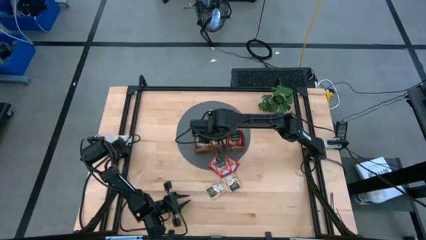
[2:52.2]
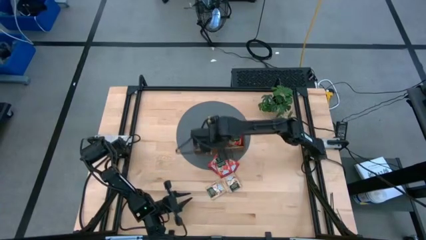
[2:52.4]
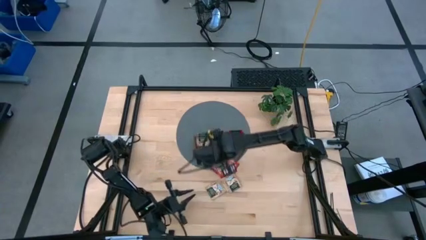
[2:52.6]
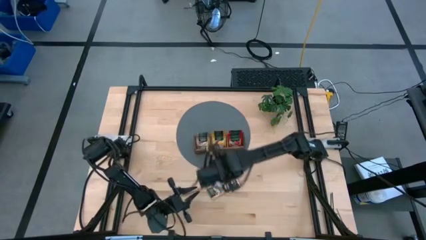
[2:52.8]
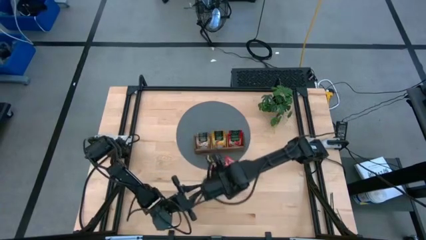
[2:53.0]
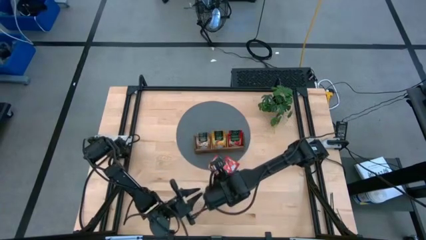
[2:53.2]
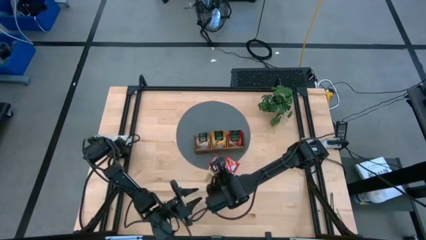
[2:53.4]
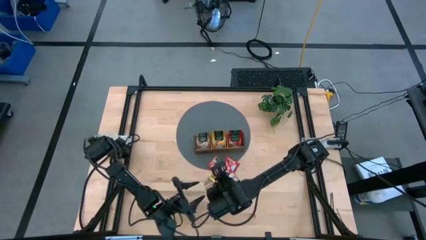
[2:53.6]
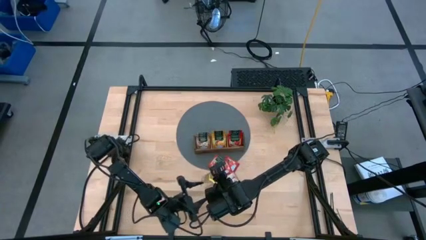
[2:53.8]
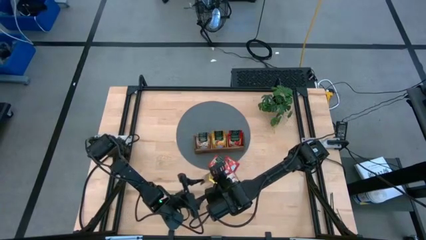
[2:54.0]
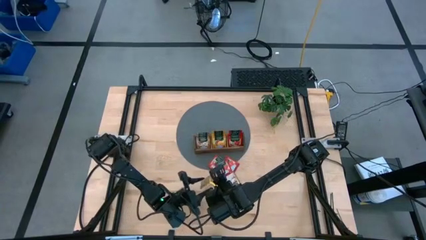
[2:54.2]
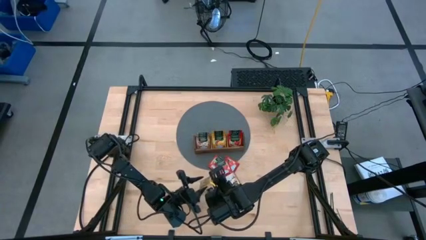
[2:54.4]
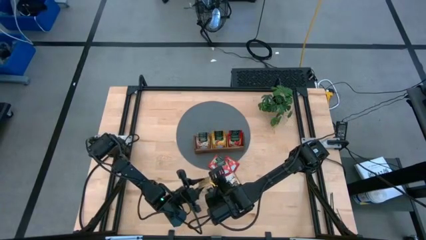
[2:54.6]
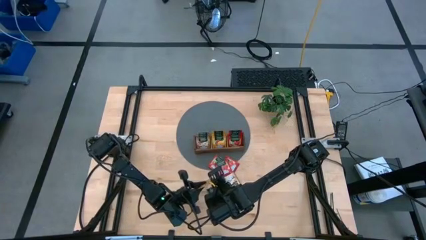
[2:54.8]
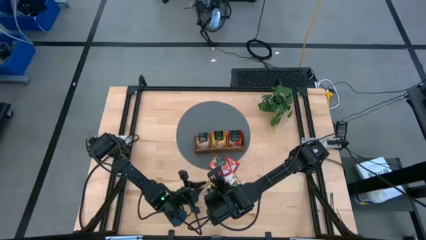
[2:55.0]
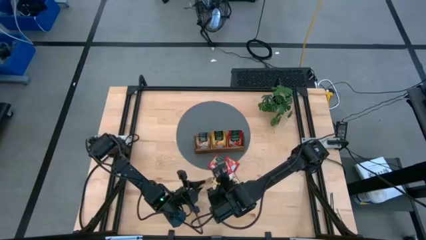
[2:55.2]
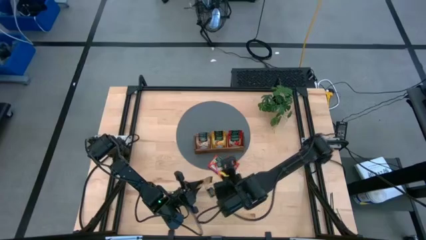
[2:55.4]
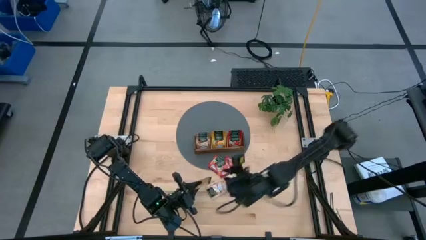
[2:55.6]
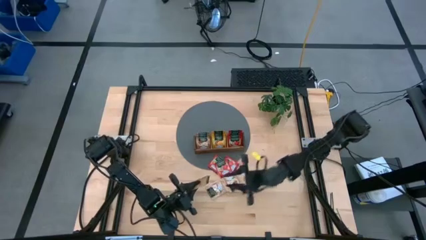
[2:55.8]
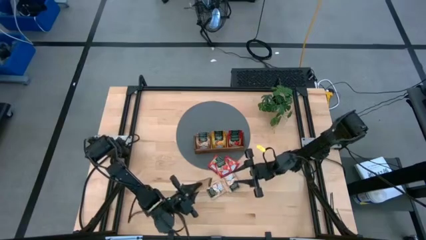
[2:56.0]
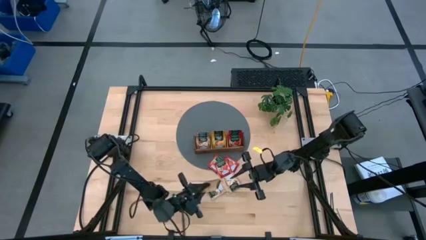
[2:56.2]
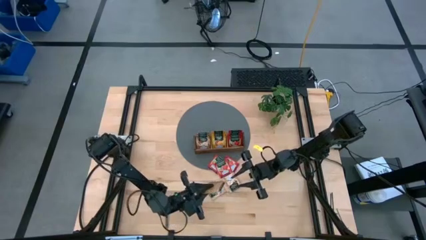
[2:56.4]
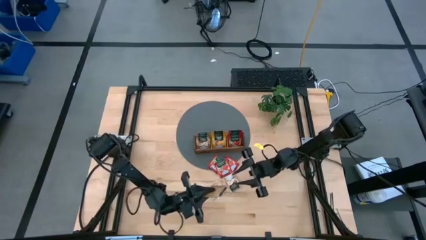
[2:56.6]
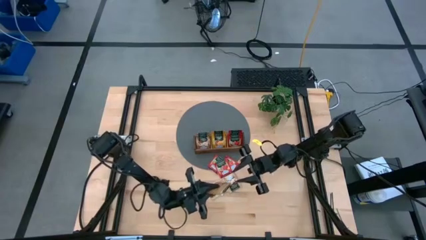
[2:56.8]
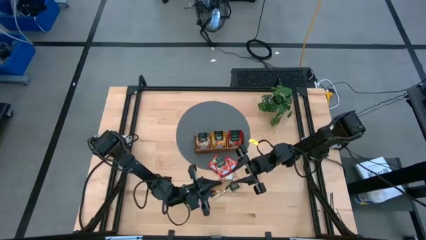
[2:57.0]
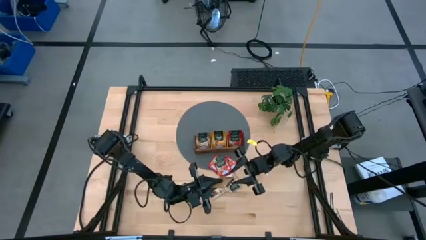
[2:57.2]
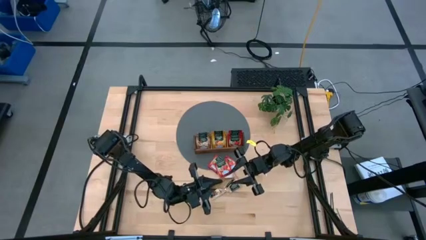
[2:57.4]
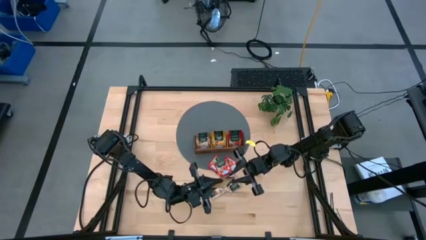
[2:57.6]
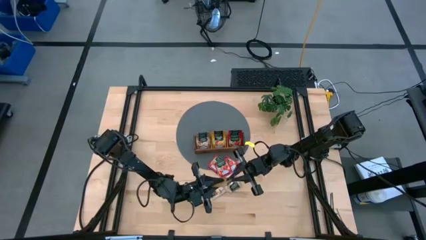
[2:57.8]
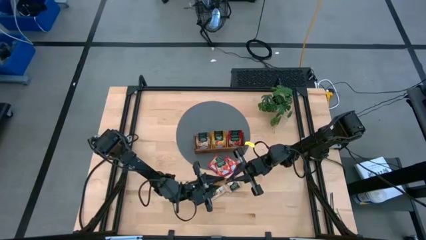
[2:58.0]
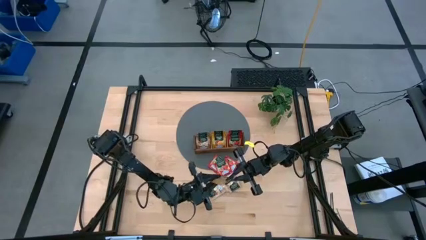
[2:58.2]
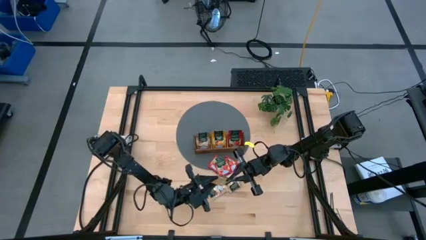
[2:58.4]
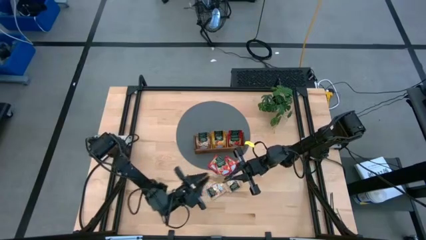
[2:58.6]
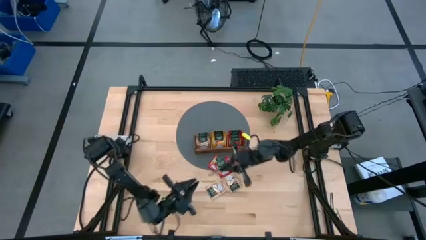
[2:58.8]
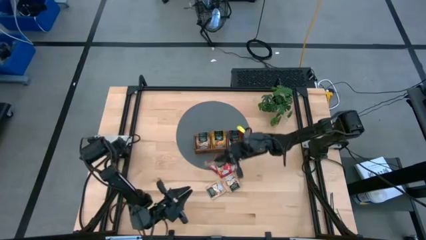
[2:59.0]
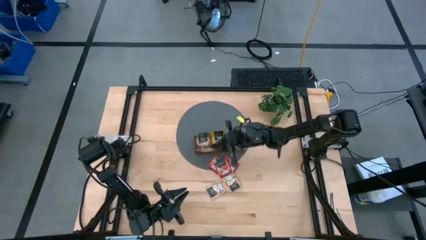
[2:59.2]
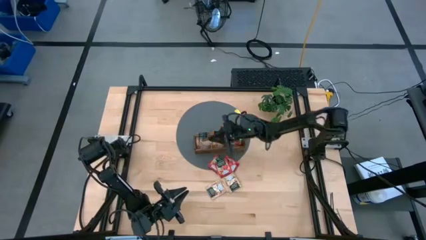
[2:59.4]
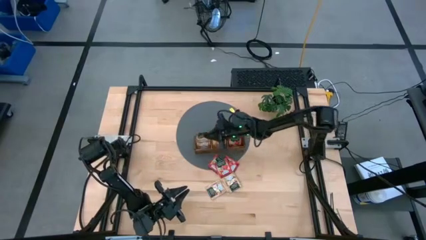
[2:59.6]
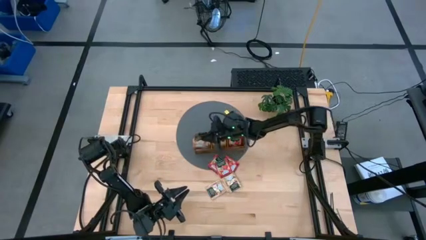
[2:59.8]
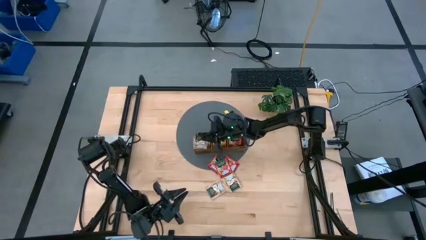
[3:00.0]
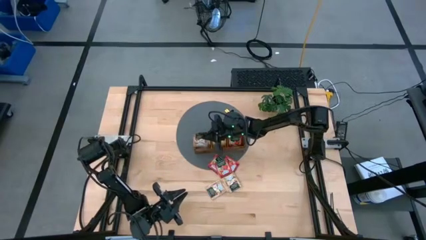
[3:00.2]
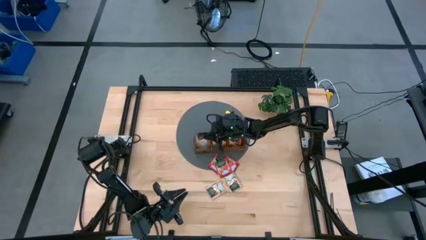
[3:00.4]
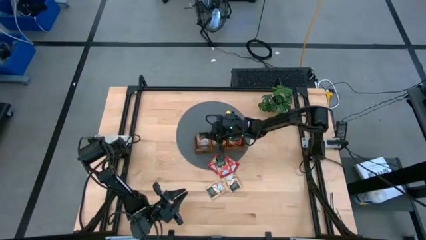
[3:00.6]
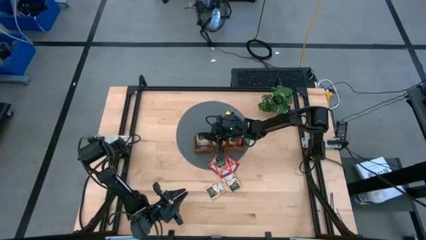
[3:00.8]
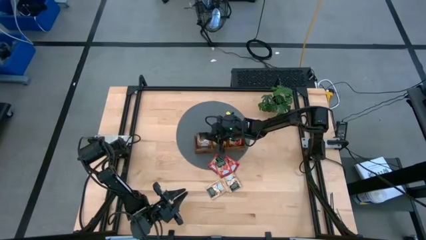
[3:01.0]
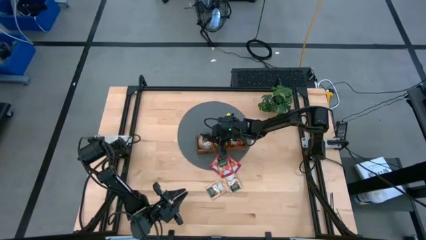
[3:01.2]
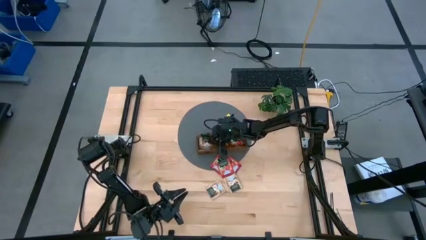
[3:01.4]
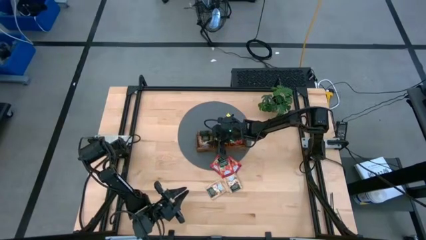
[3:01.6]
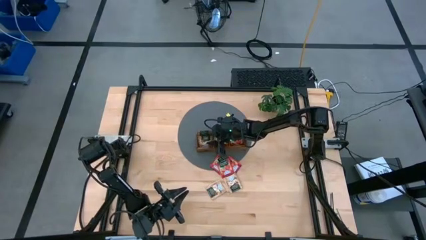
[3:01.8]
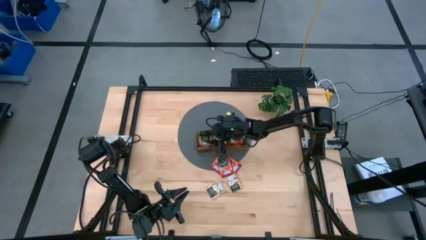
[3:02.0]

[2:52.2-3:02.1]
Task: Pick & Place Tea
Put the brown tea bag into the left section of the wooden organizer

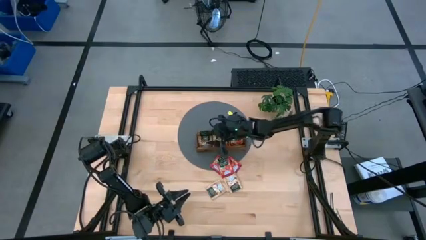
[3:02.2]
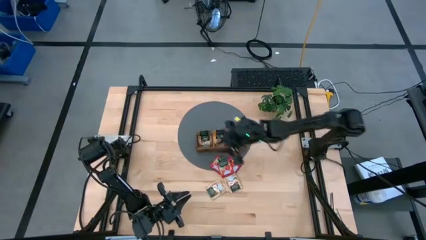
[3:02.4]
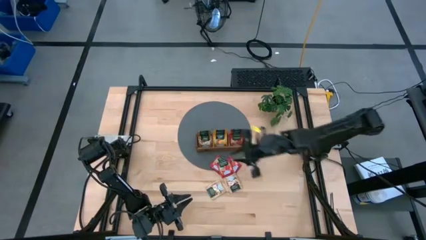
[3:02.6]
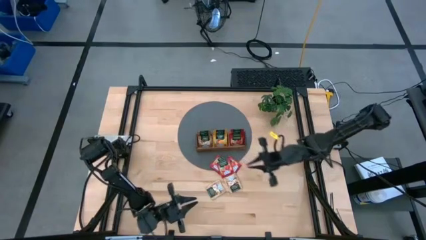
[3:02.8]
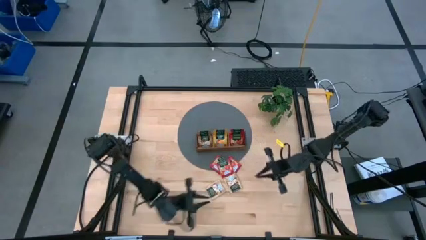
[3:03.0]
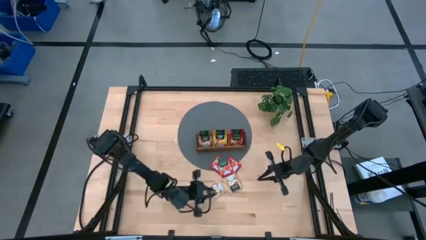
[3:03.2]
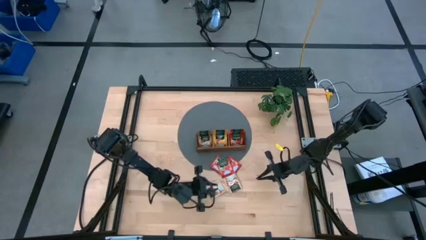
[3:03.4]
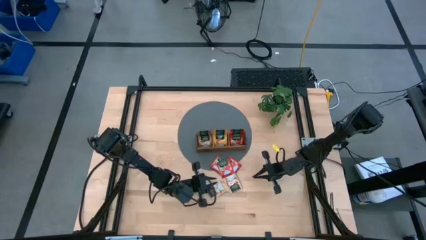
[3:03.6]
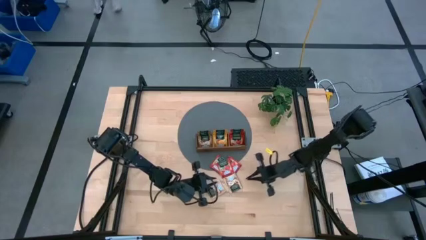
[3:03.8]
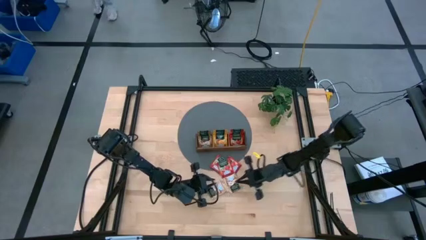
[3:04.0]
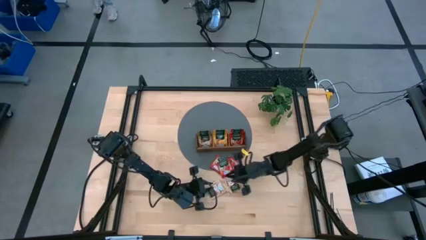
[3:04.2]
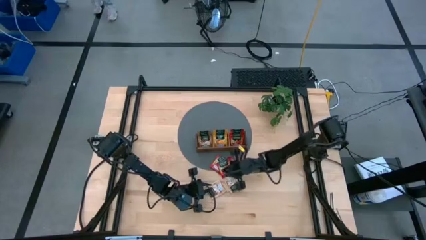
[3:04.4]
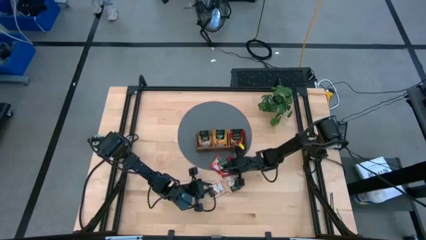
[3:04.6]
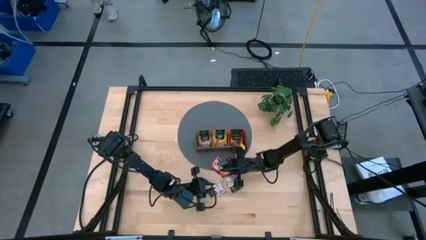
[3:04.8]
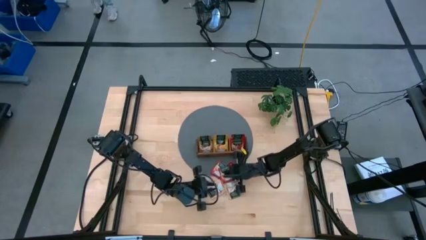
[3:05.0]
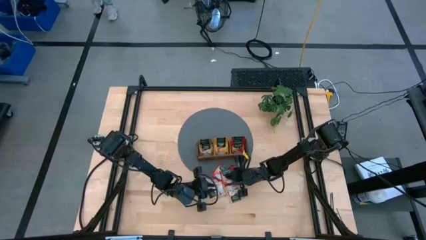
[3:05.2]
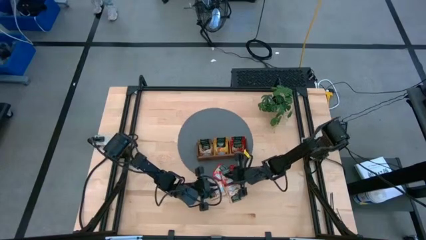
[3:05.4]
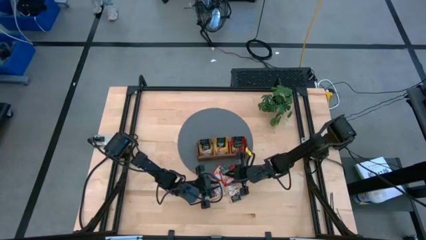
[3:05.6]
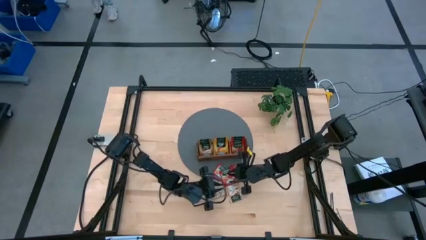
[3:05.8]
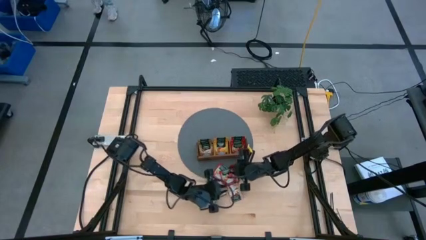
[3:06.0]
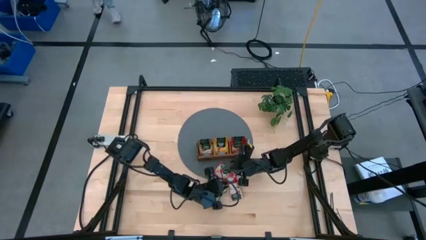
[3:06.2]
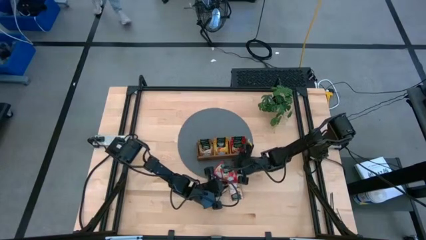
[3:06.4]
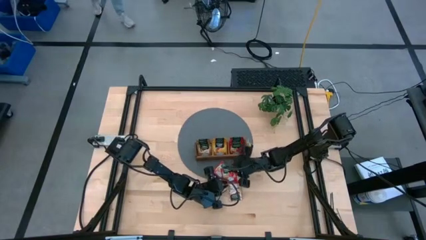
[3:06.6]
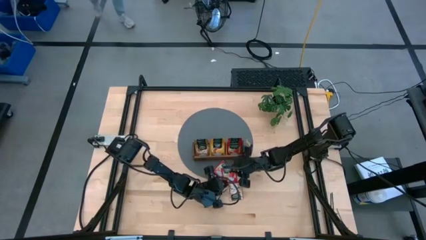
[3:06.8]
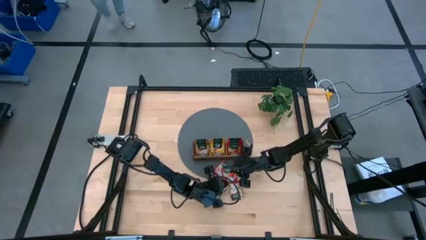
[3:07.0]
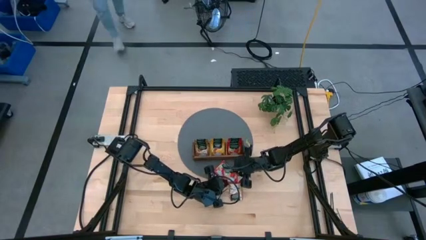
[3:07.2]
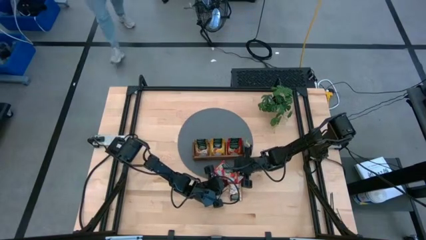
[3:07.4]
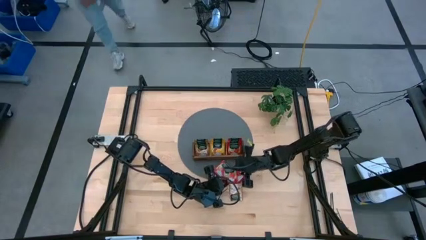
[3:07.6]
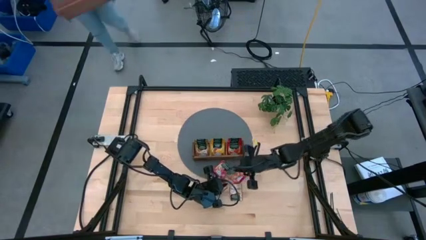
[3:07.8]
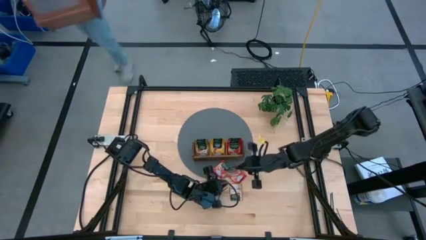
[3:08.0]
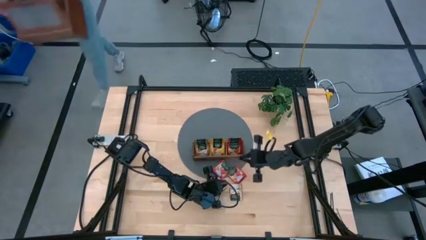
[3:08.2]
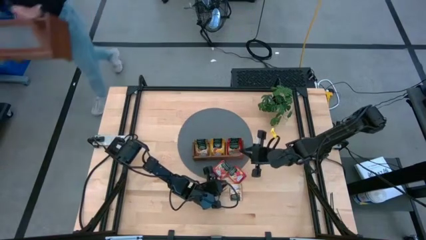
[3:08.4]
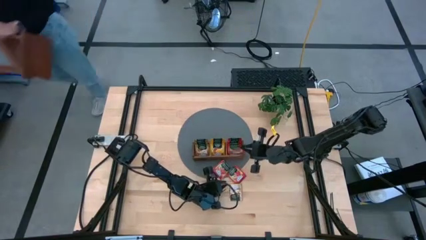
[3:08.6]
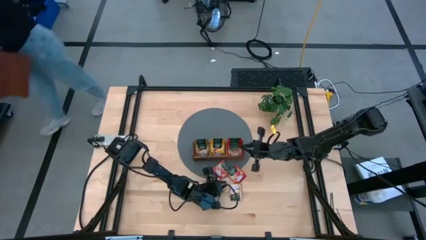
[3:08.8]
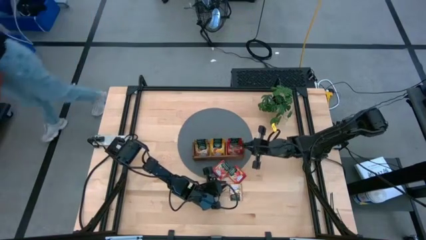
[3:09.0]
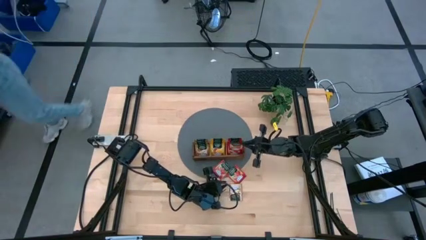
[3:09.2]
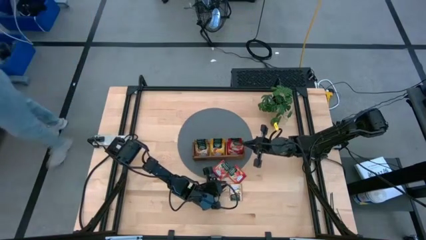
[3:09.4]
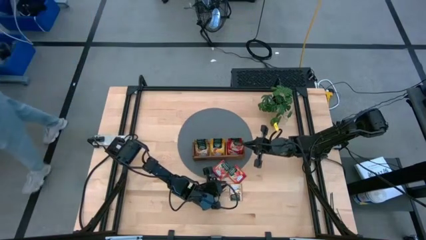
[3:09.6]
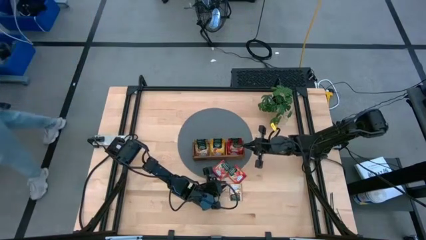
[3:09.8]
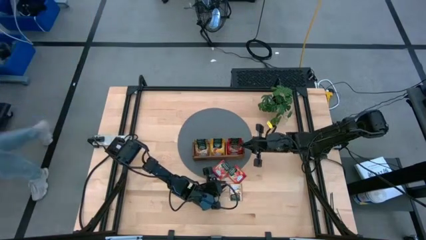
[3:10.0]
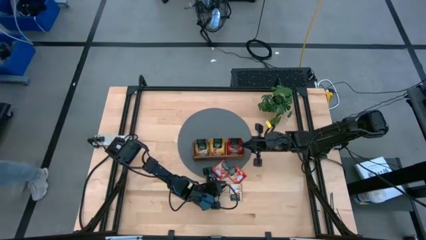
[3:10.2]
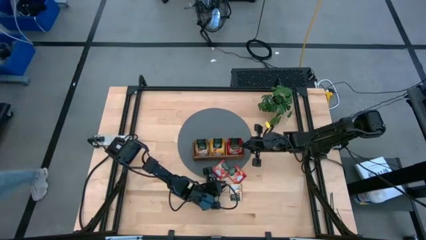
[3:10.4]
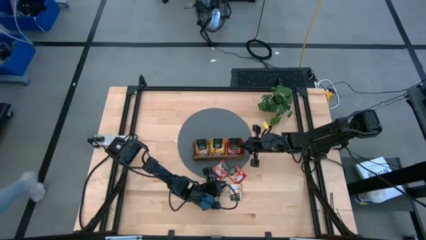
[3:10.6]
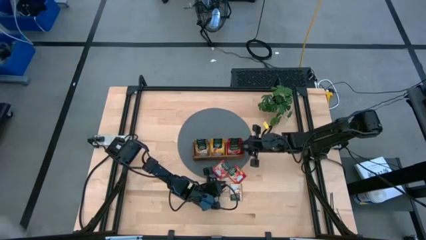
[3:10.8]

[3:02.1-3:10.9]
Put the red tea bag into the right section of the wooden organizer
